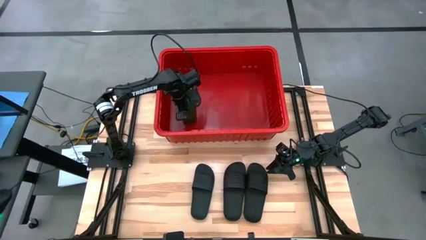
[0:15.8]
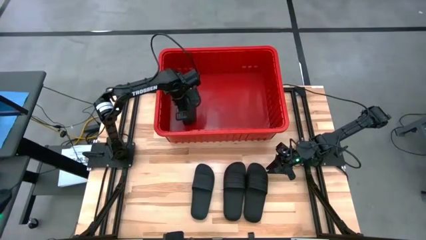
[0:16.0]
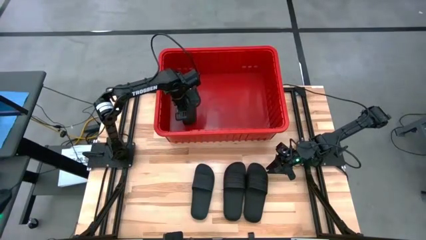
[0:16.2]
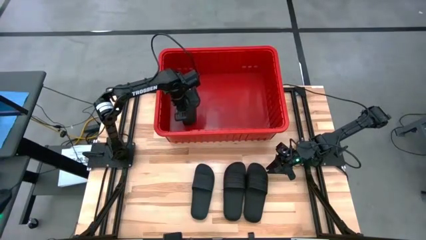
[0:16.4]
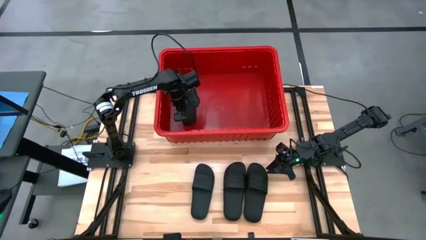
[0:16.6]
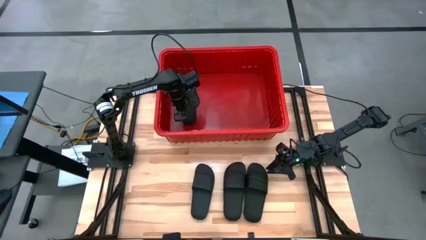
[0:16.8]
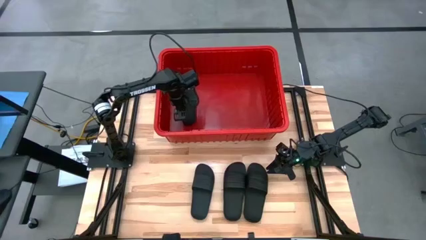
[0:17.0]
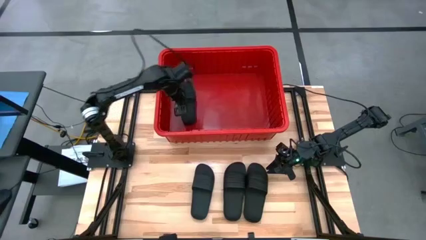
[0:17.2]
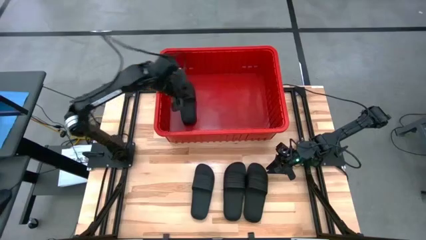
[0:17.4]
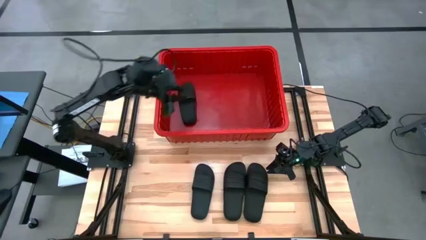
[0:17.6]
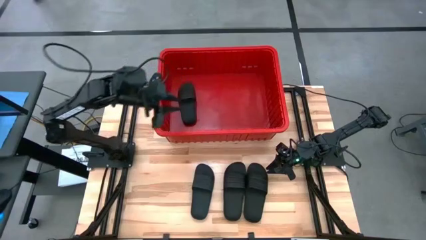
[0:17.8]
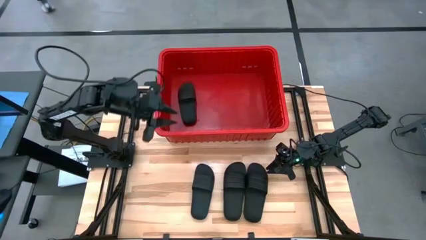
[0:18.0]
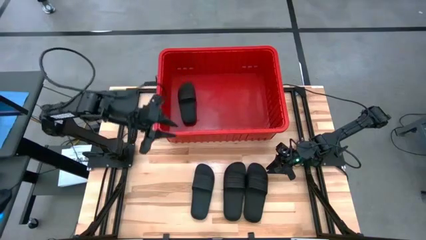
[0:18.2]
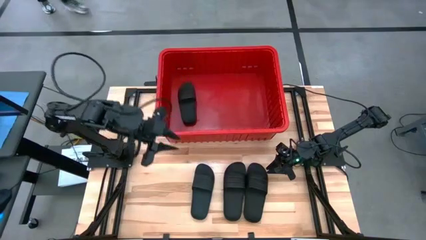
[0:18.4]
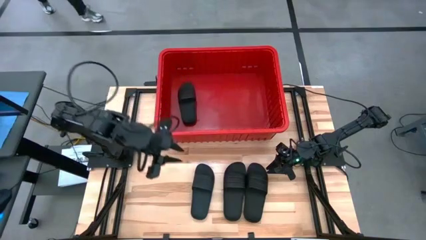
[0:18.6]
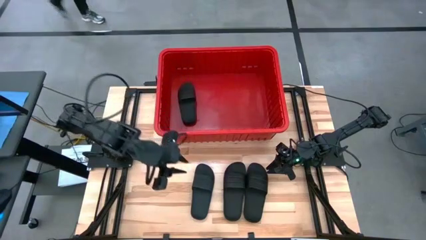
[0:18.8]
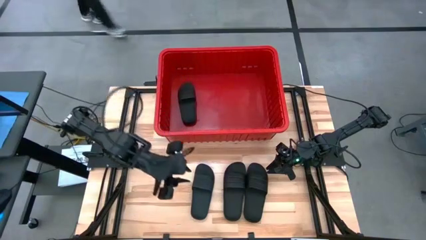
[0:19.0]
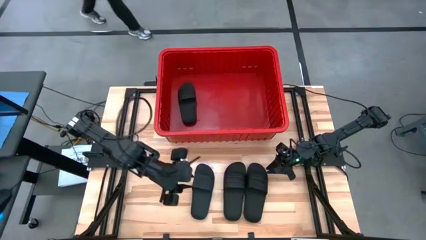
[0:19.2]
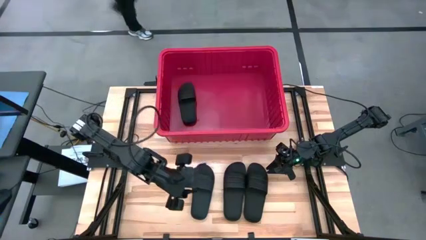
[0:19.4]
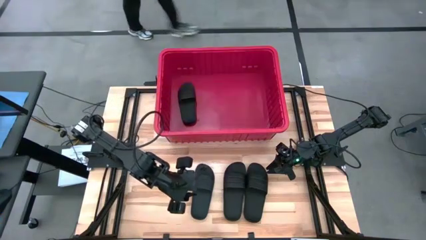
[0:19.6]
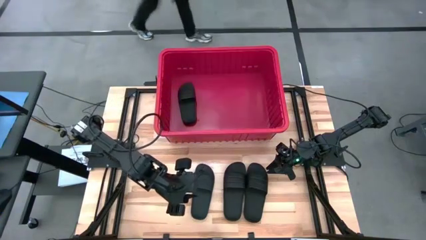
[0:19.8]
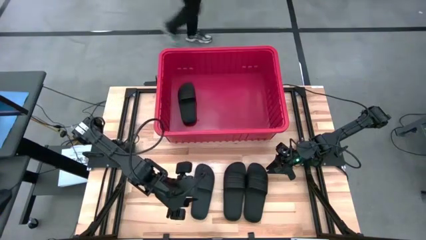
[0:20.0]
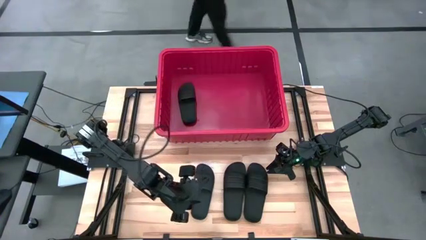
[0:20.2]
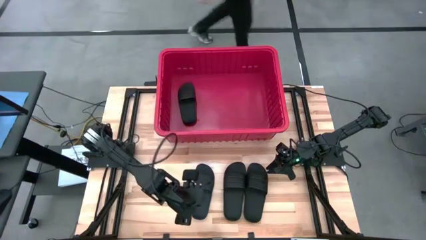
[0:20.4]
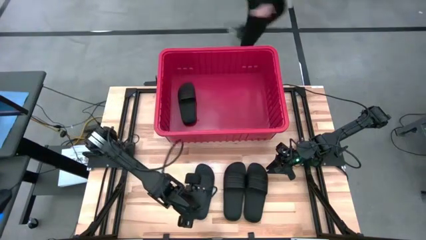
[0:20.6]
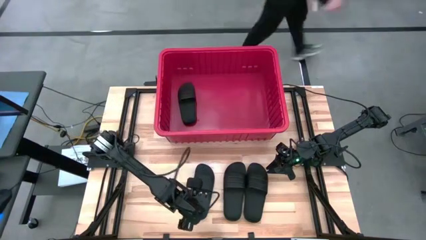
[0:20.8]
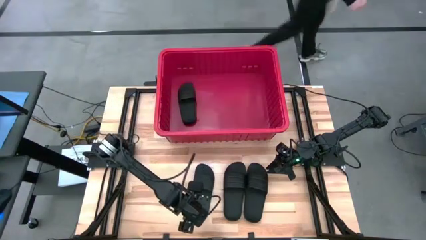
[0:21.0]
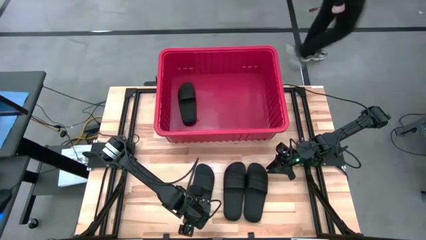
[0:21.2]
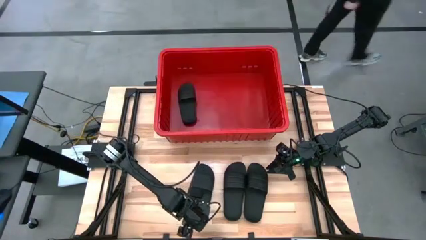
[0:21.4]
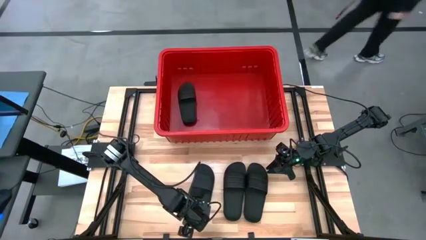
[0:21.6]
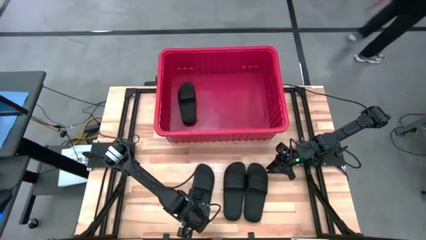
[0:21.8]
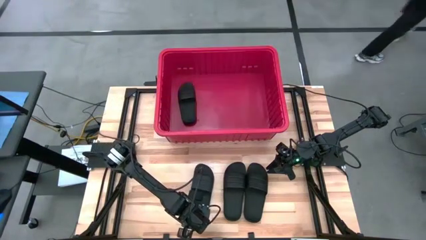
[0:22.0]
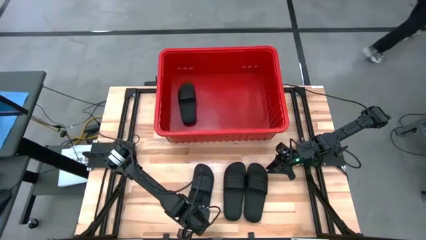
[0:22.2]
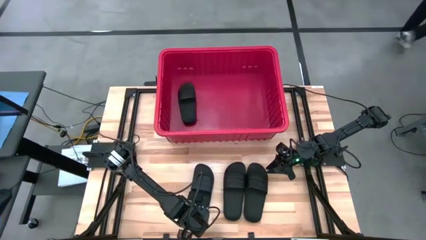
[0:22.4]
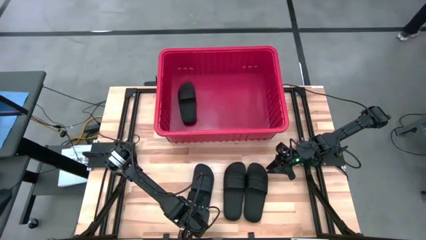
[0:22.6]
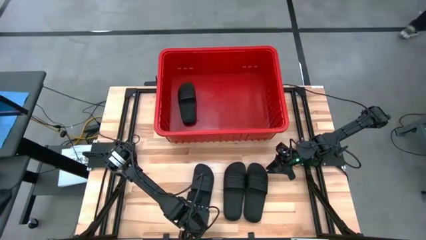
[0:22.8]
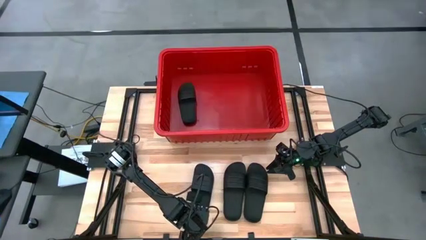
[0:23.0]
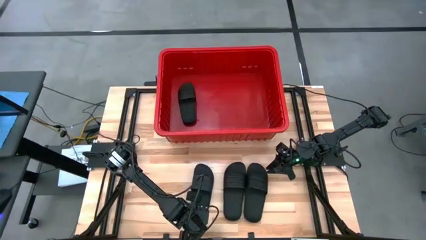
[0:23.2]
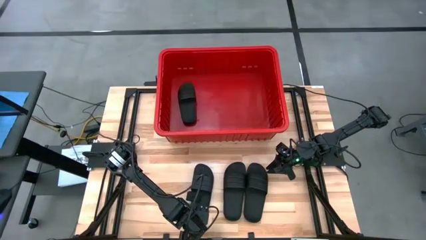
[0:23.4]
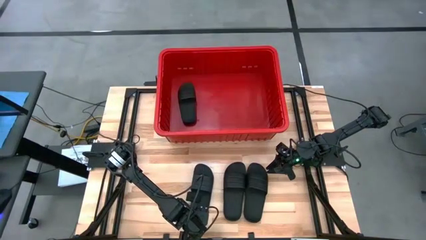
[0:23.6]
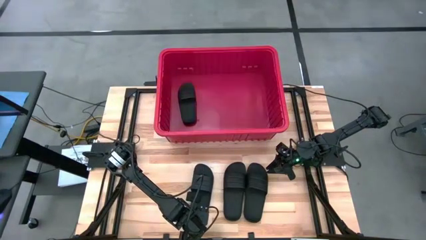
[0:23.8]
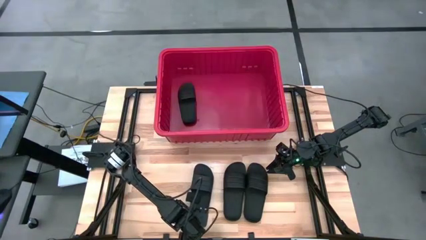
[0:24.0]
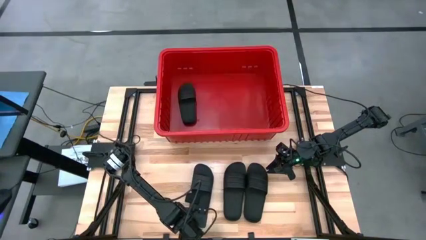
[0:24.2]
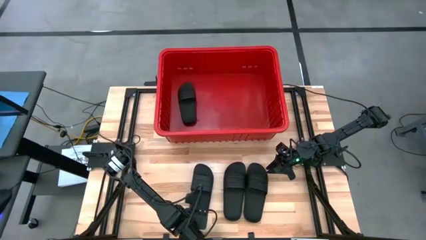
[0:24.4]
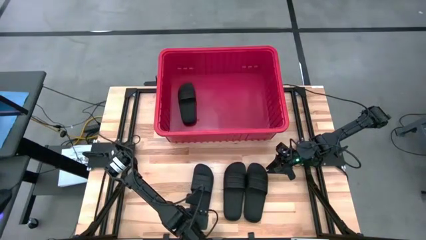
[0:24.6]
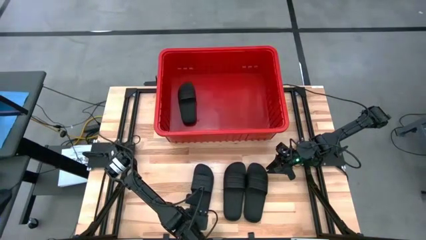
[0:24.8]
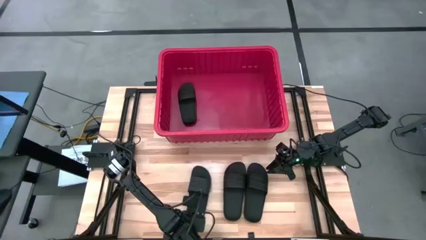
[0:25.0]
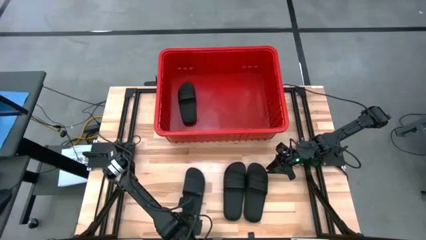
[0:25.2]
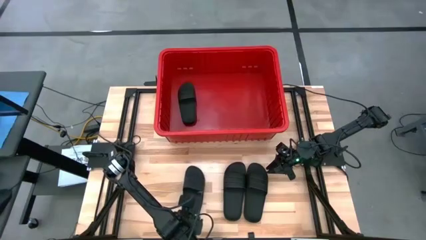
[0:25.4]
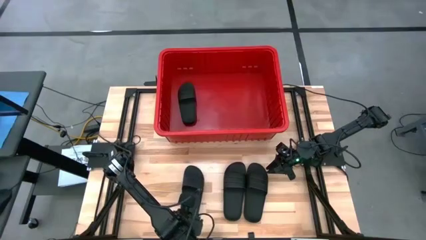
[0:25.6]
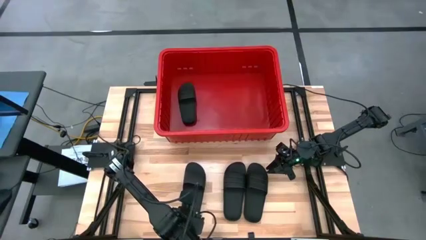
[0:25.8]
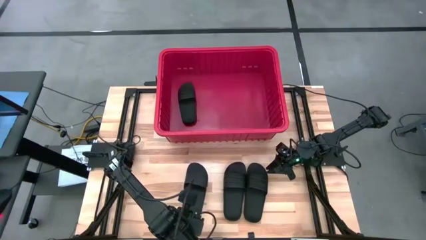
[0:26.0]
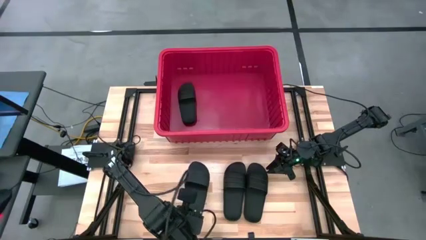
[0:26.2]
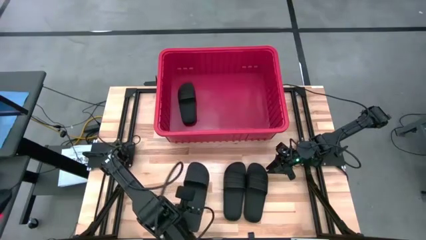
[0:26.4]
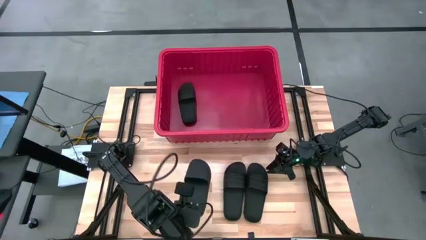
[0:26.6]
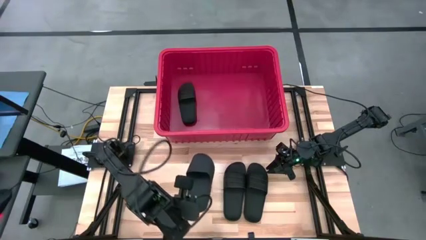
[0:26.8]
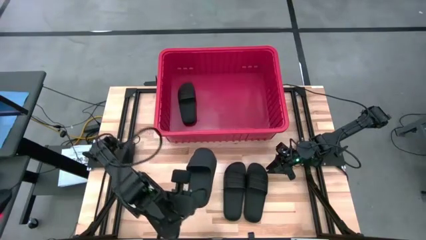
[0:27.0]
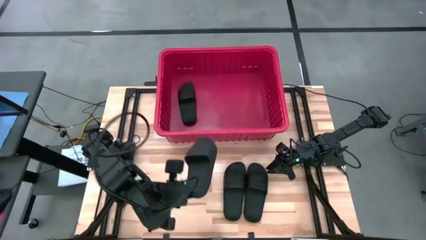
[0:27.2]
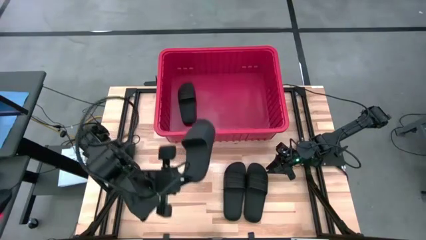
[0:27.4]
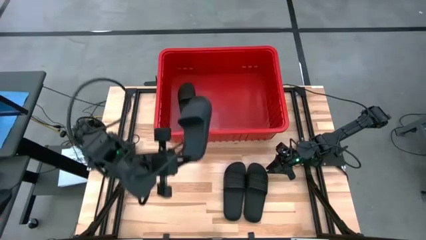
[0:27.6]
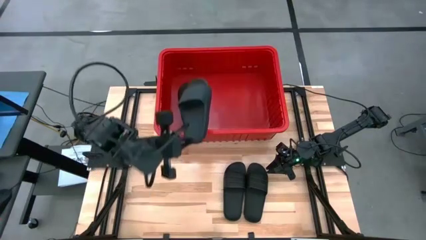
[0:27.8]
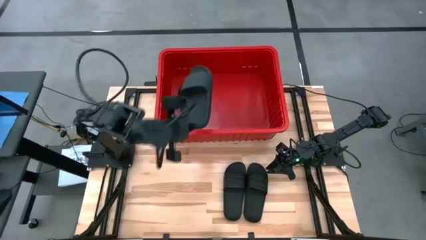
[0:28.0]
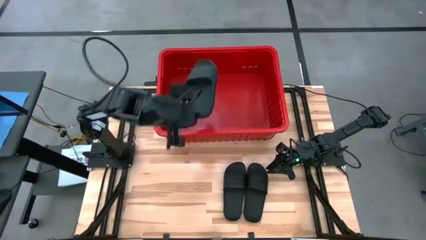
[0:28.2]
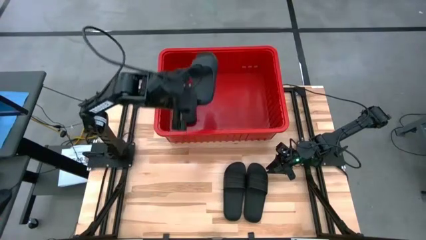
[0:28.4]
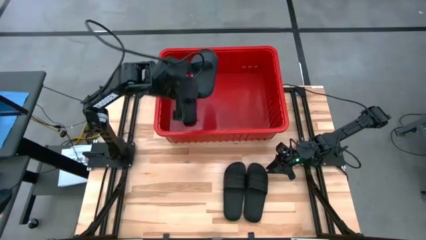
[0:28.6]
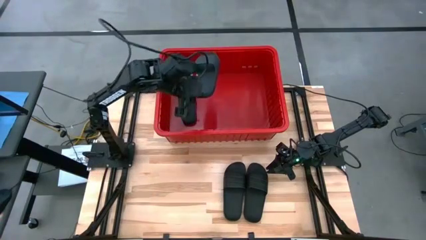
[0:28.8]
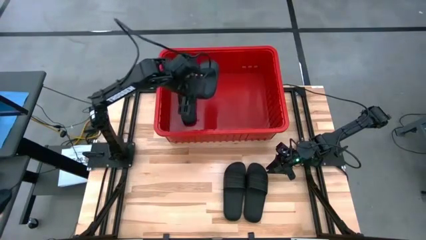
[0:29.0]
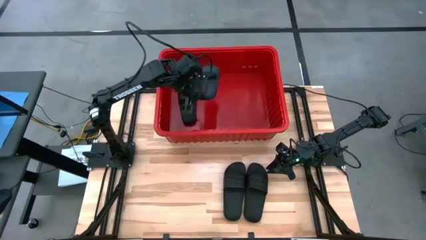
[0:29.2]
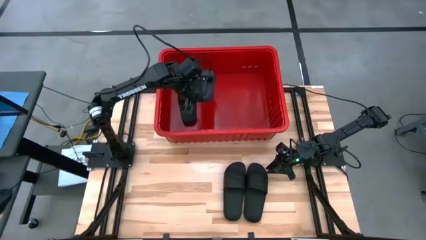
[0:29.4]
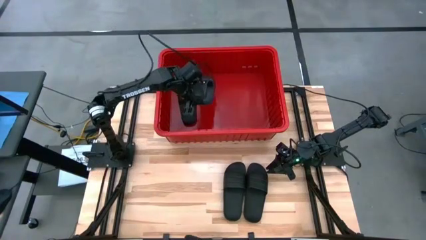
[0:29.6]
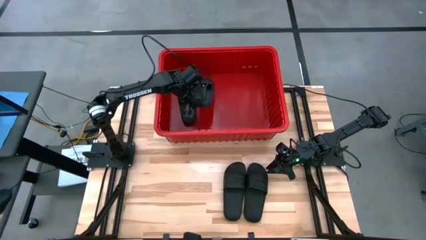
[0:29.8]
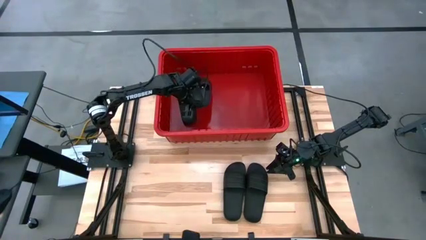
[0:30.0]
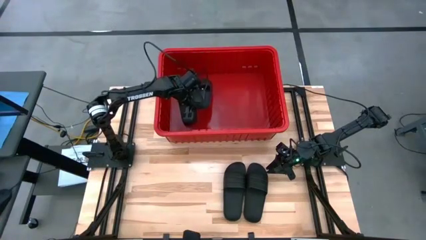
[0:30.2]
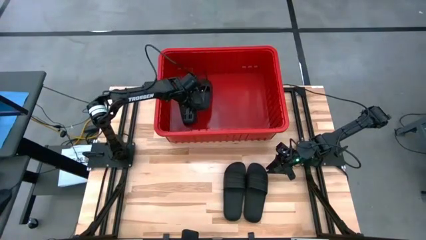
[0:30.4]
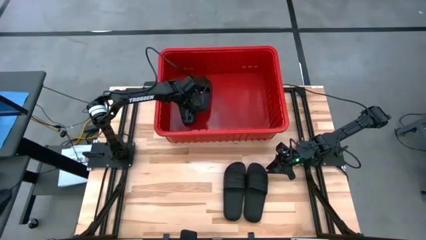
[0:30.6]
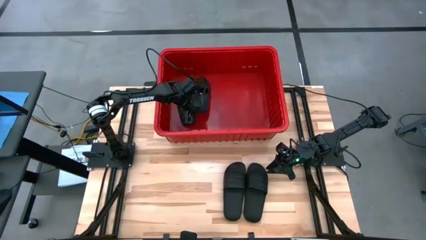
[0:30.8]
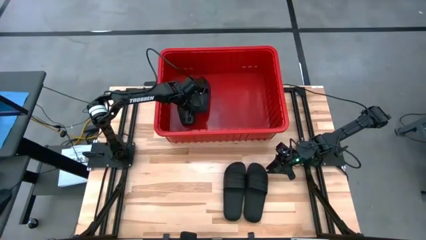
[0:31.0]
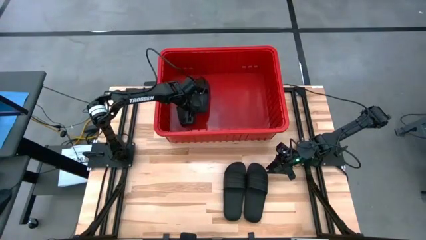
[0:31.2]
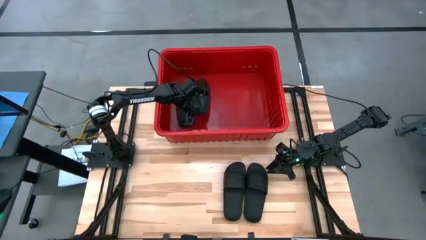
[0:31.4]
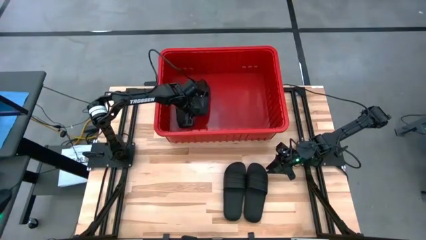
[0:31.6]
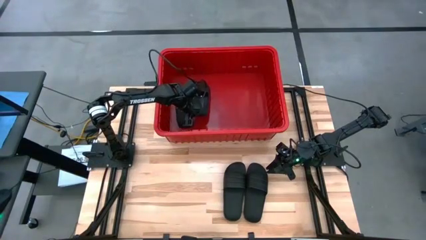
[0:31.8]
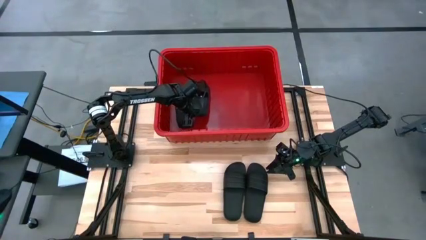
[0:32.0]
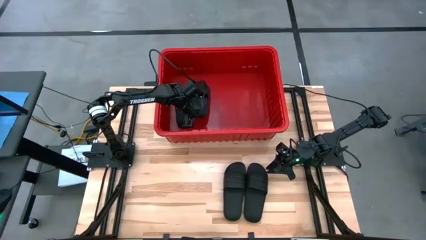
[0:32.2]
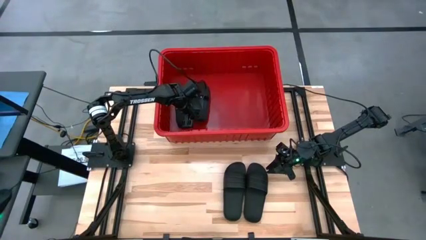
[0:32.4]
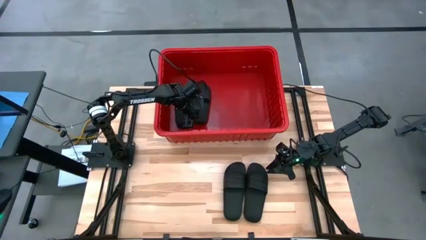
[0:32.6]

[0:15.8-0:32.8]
Task: Pick and place slides into bin
Put the black slides into the red box

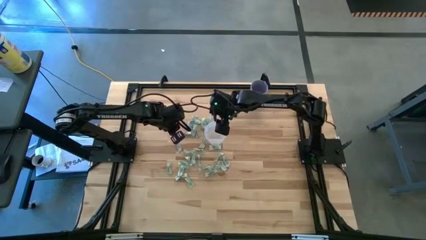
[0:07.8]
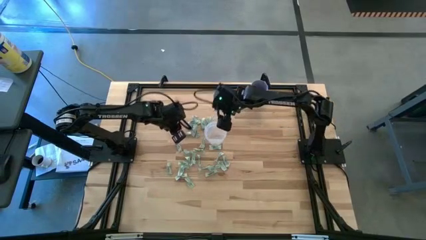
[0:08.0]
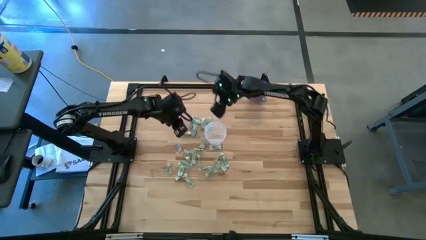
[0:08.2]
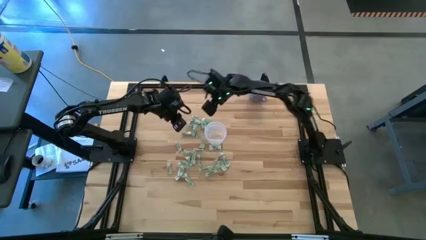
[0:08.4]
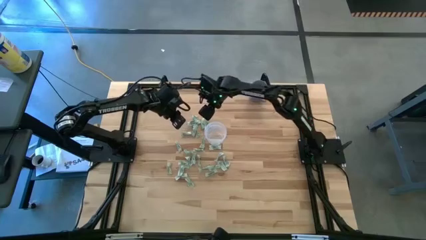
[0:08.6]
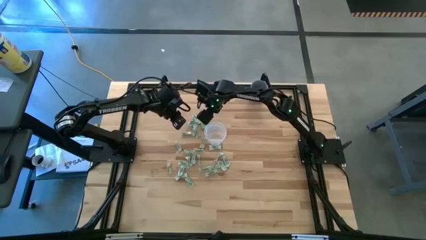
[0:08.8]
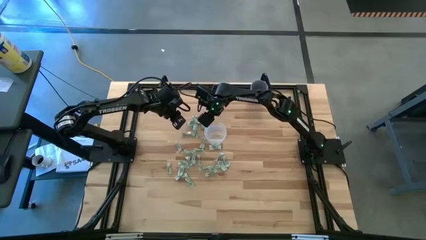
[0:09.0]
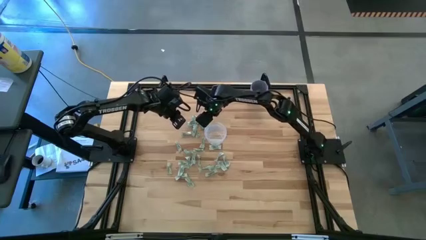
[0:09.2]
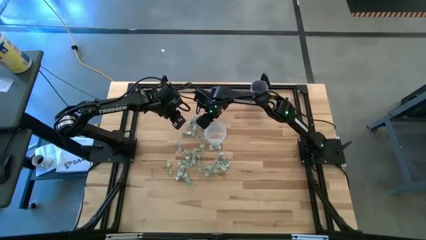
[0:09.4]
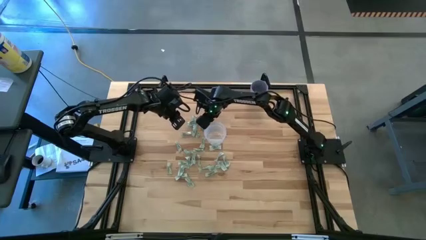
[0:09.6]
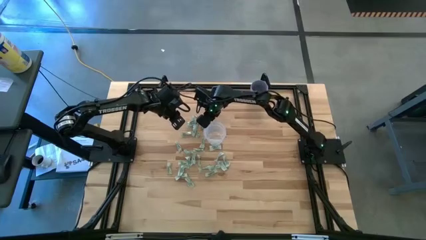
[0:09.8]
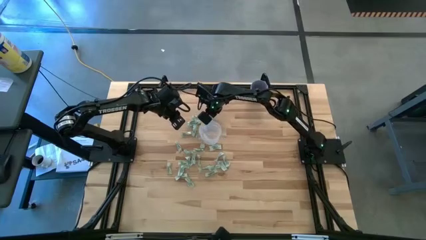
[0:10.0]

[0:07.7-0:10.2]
Task: Pick and place Stevia / Truvia into bins
Put the stevia packet into the transparent container
